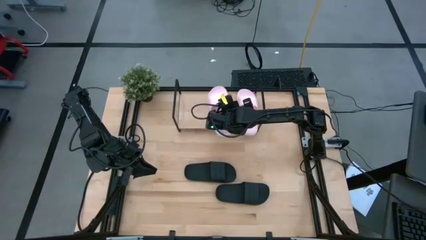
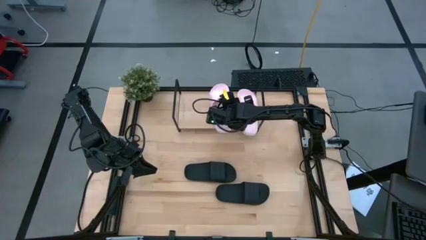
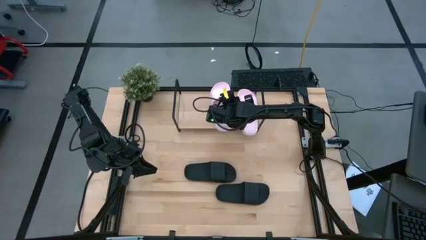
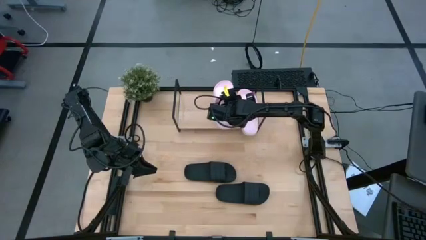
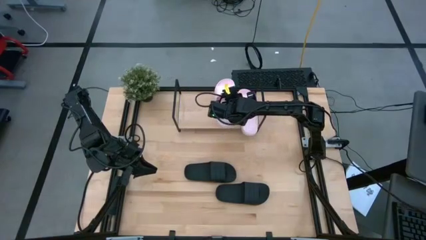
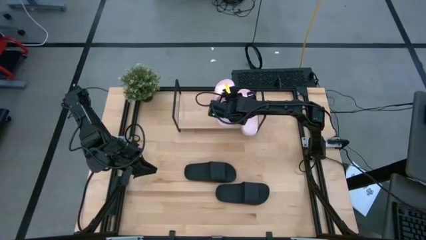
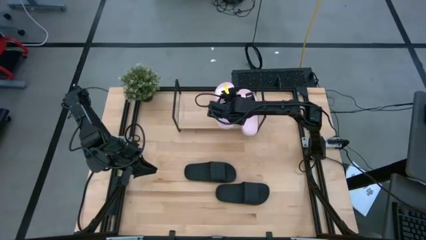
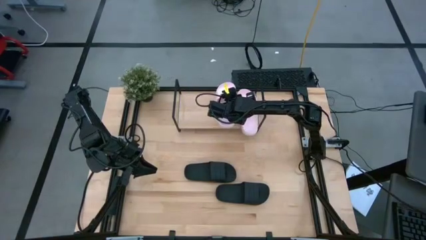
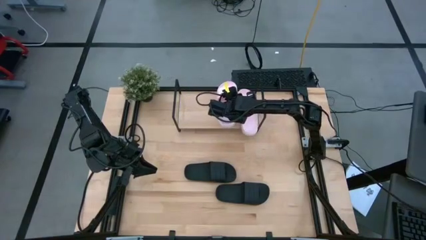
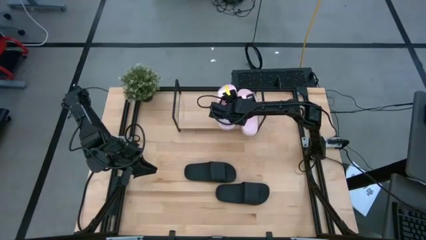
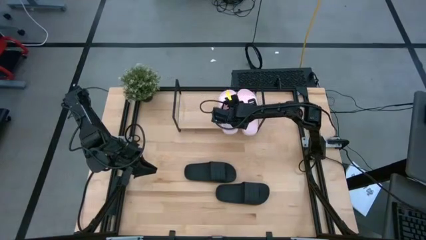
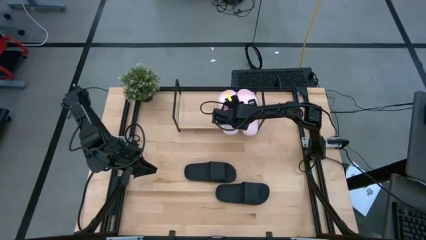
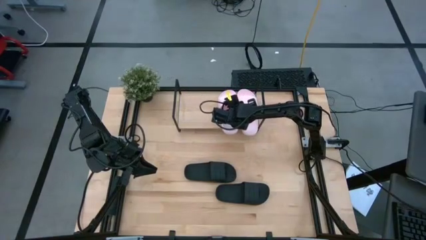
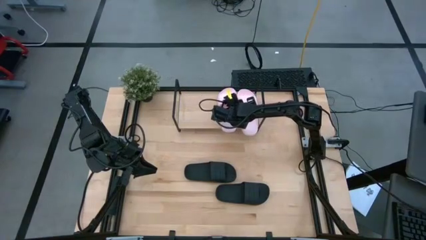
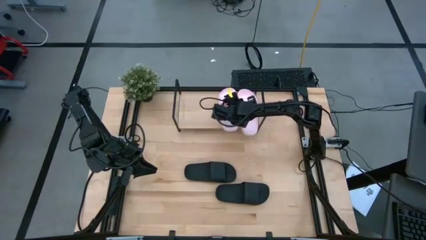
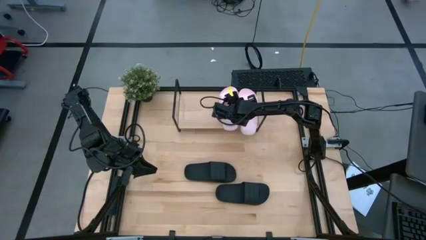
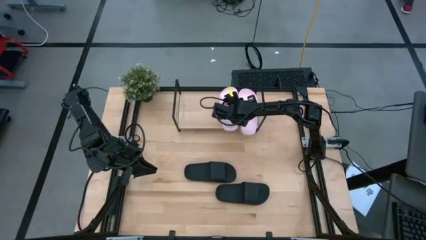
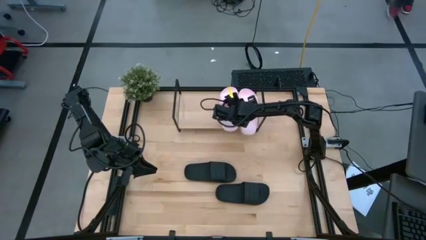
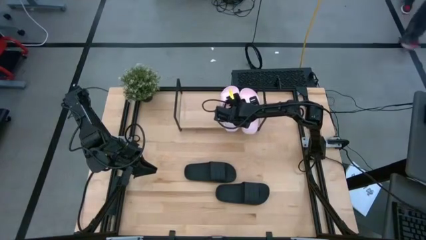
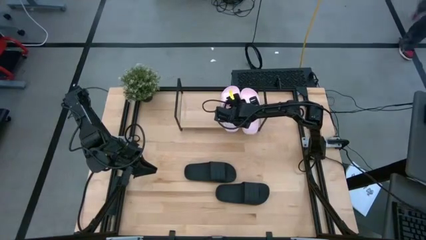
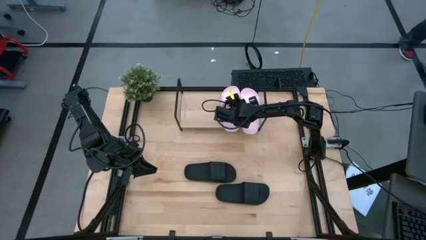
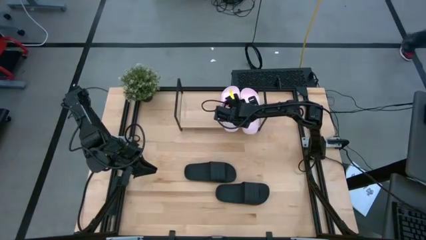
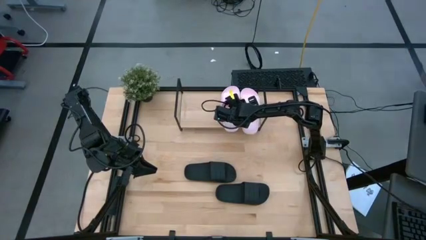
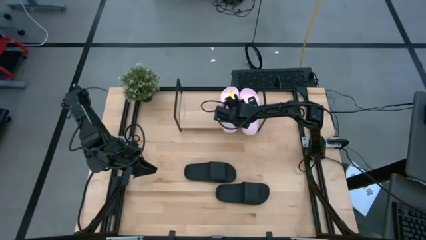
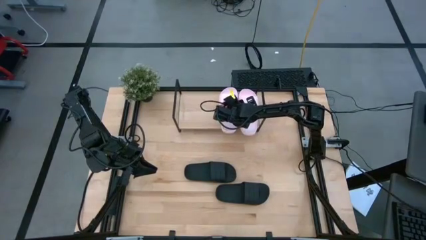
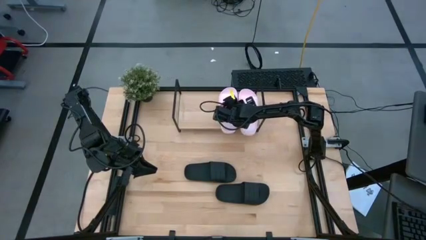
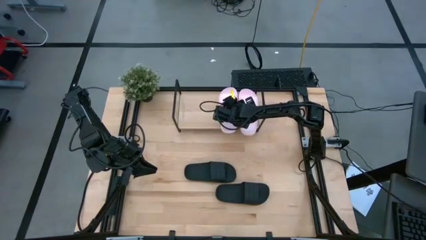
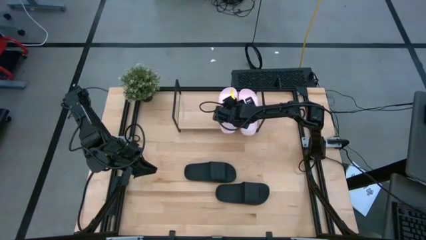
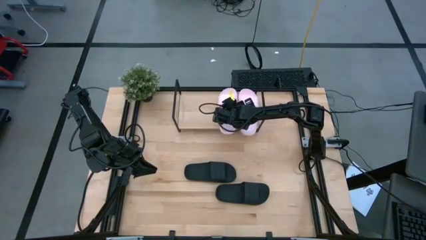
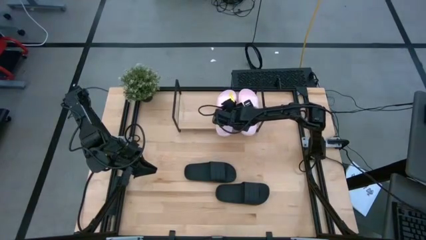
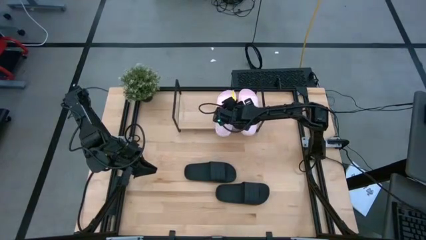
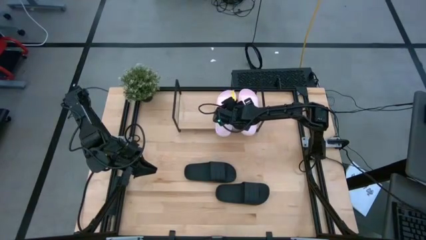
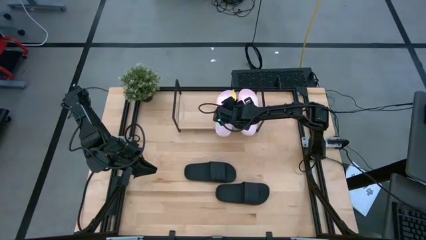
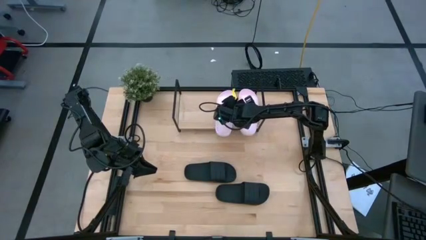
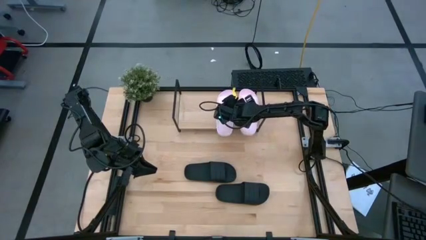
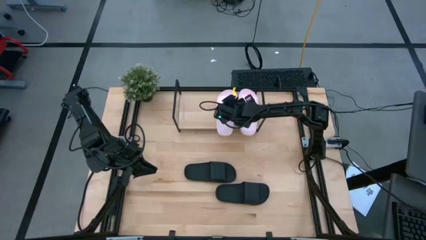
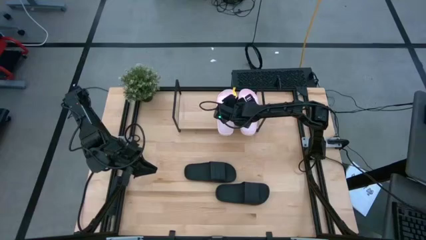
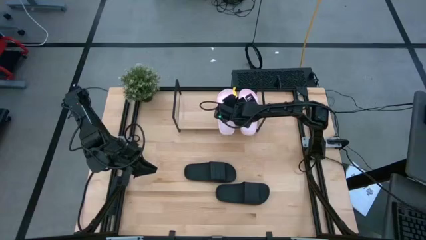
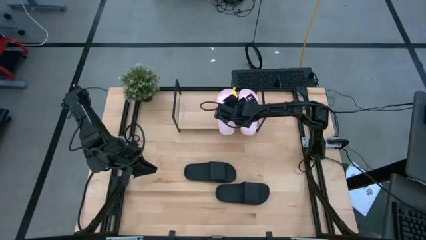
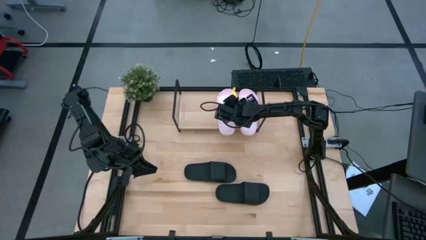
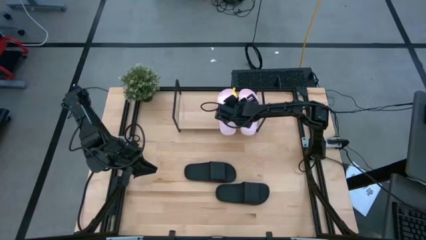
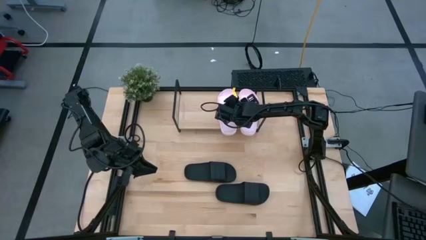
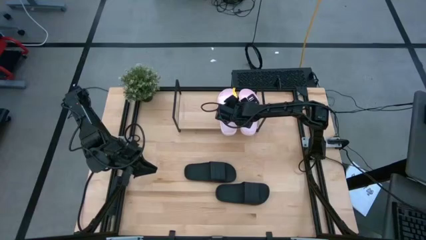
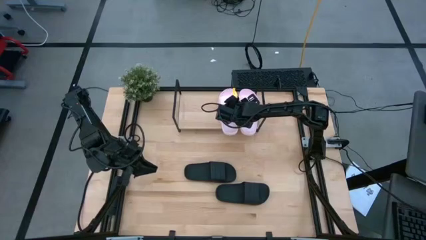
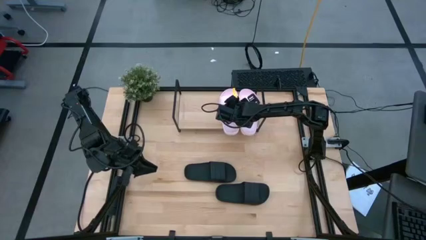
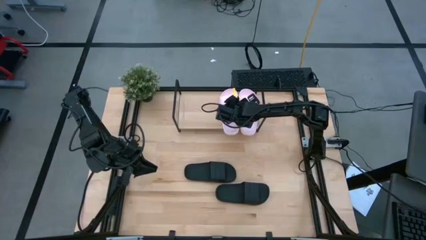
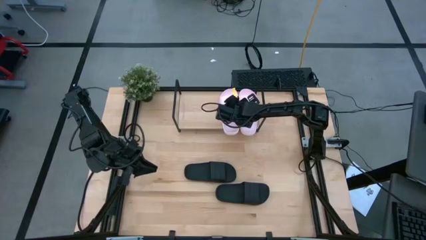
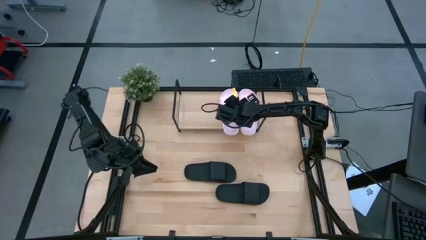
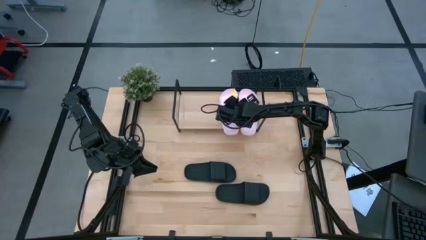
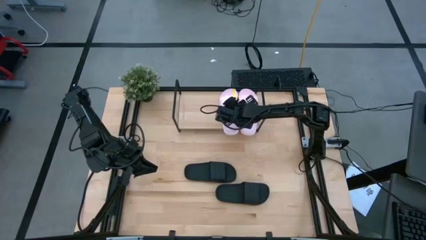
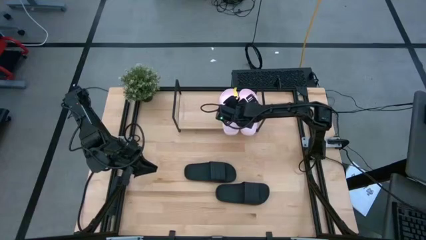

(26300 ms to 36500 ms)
Task: Pick and place slides into the shelf
Put the pink slide on the shelf
